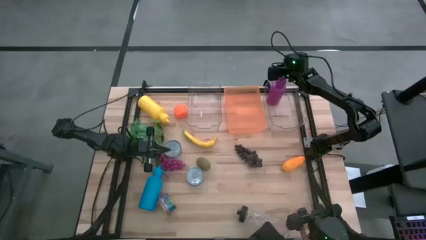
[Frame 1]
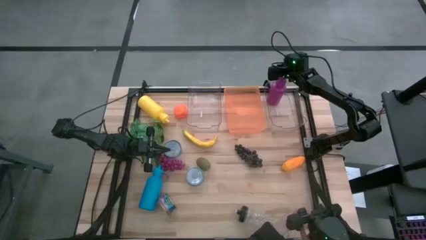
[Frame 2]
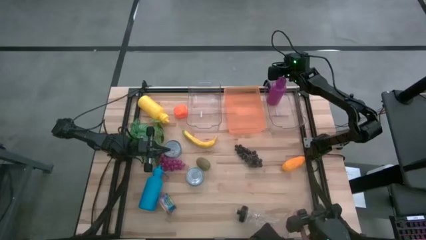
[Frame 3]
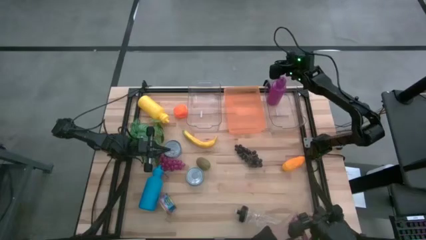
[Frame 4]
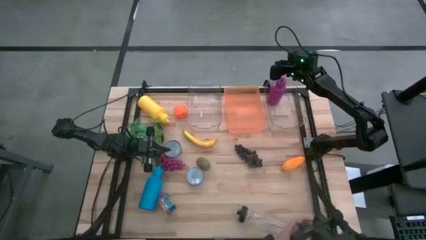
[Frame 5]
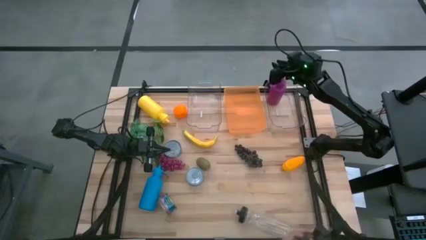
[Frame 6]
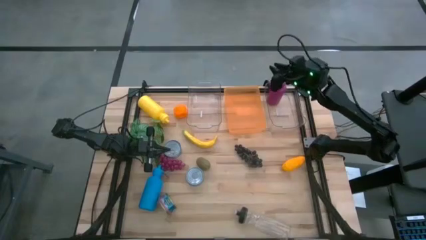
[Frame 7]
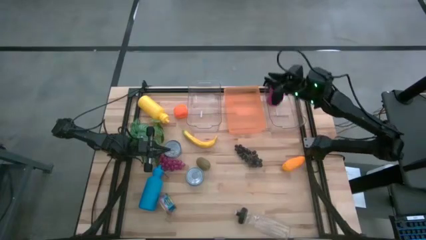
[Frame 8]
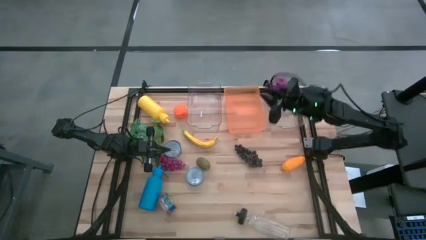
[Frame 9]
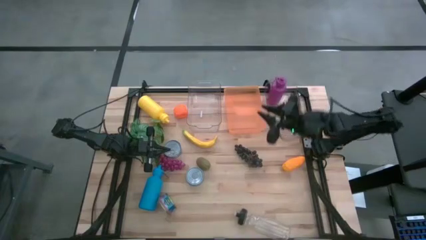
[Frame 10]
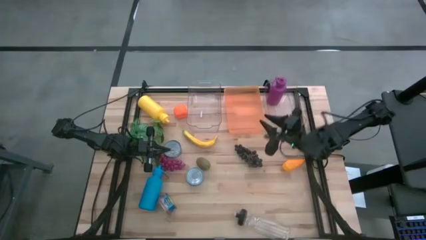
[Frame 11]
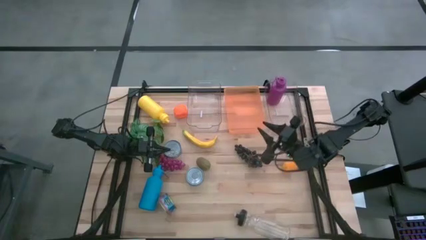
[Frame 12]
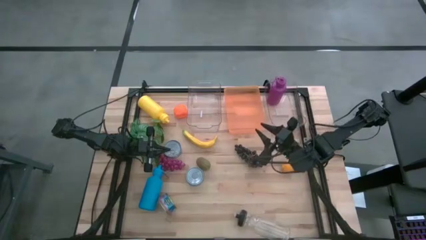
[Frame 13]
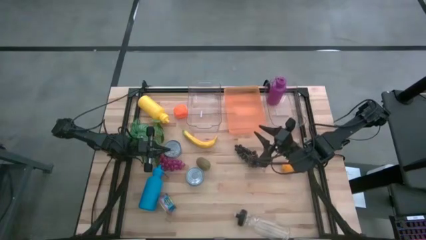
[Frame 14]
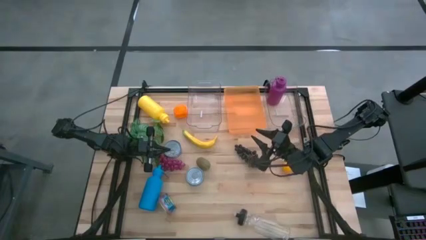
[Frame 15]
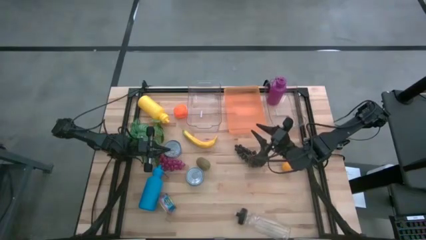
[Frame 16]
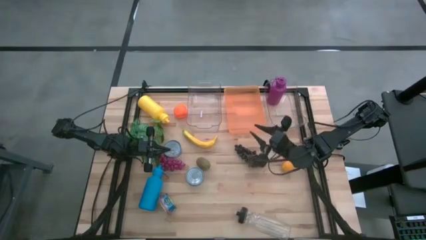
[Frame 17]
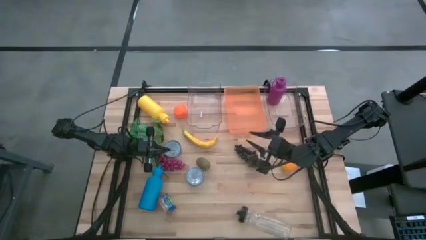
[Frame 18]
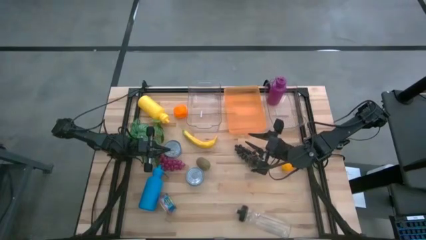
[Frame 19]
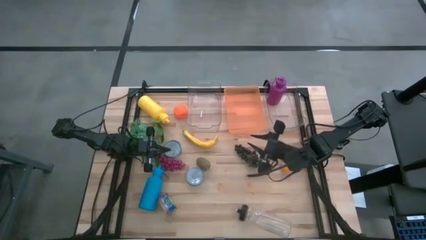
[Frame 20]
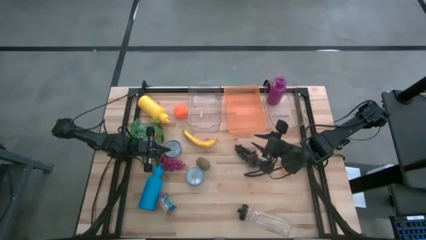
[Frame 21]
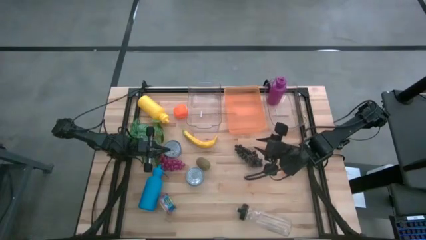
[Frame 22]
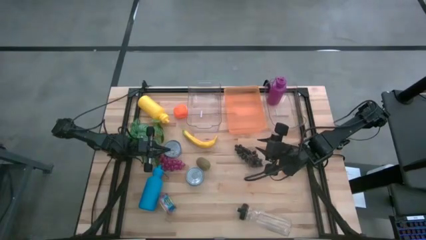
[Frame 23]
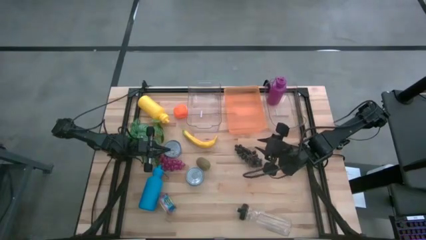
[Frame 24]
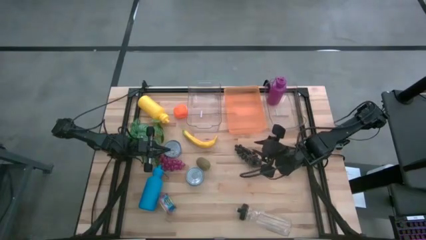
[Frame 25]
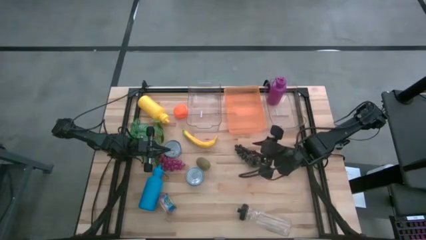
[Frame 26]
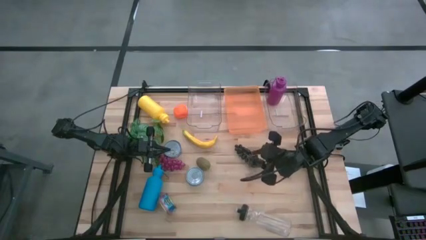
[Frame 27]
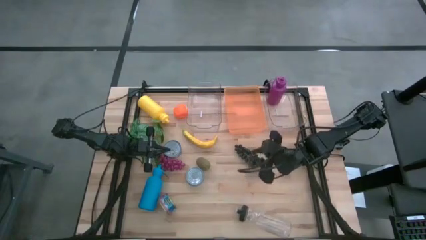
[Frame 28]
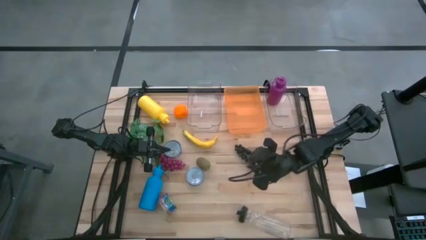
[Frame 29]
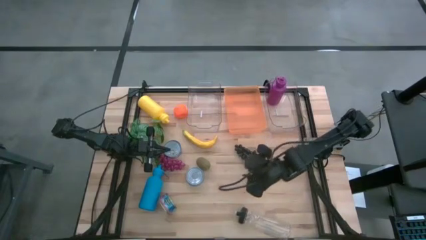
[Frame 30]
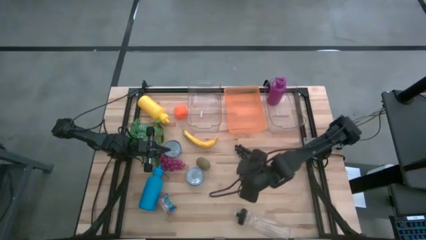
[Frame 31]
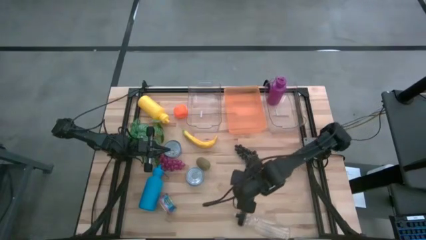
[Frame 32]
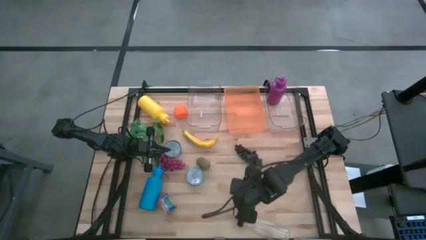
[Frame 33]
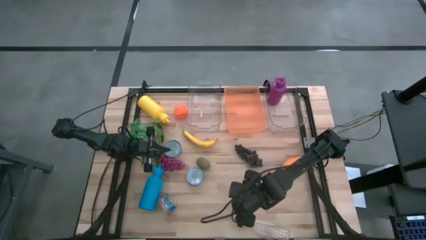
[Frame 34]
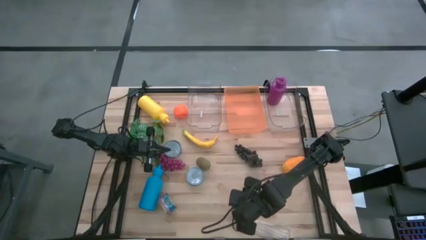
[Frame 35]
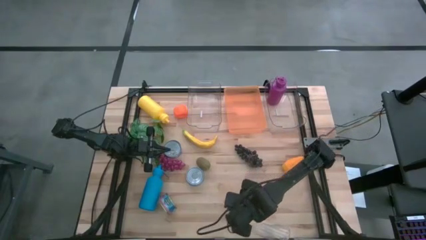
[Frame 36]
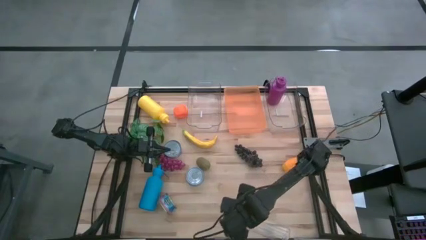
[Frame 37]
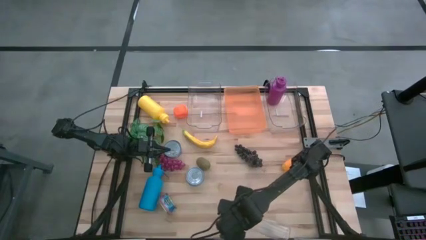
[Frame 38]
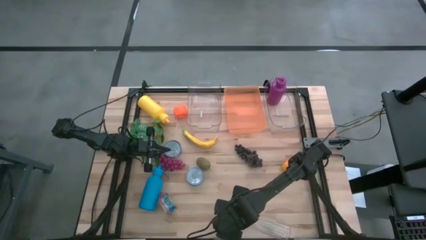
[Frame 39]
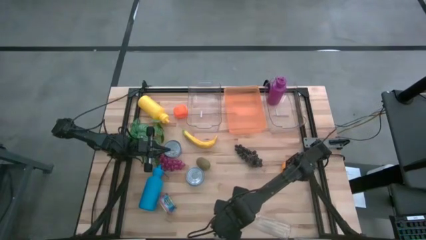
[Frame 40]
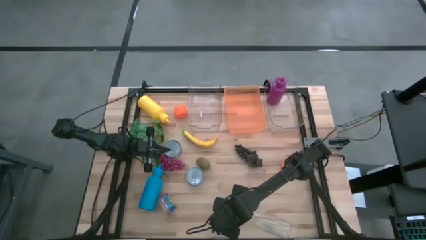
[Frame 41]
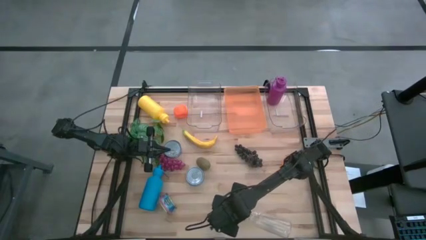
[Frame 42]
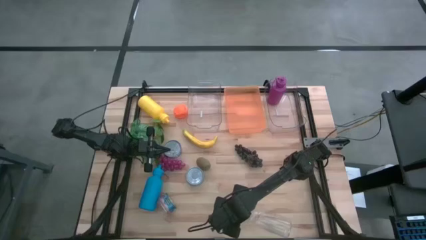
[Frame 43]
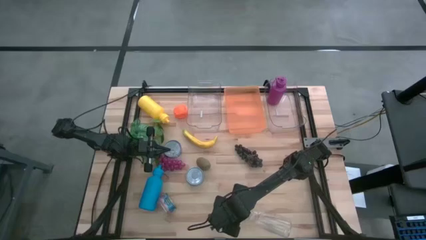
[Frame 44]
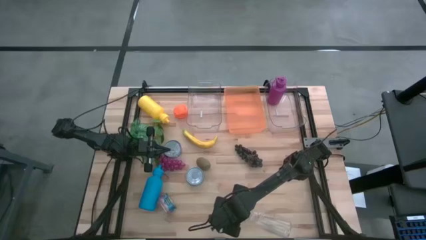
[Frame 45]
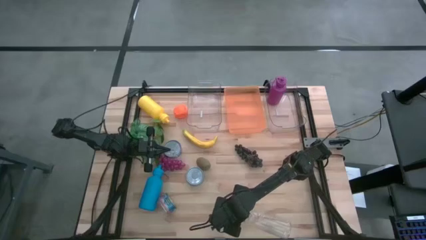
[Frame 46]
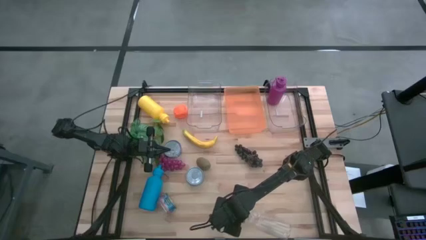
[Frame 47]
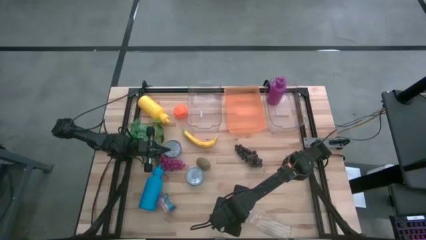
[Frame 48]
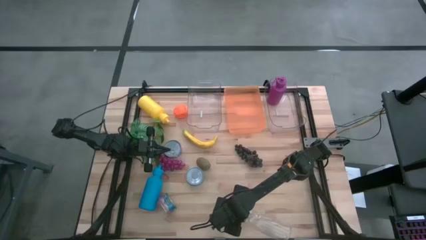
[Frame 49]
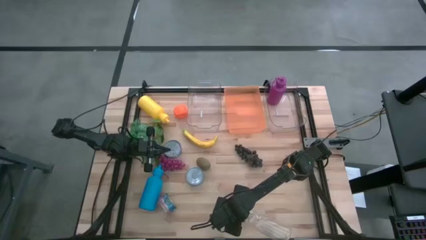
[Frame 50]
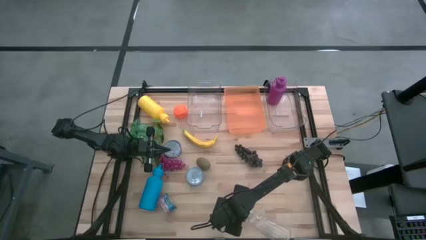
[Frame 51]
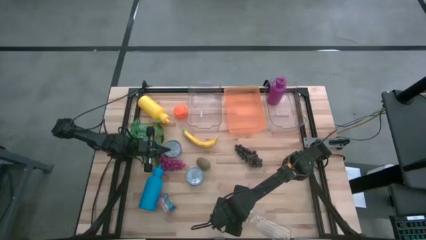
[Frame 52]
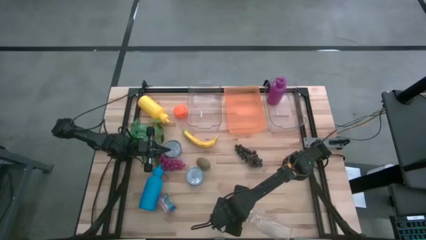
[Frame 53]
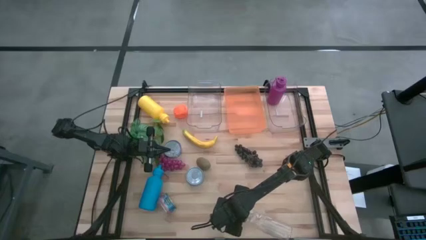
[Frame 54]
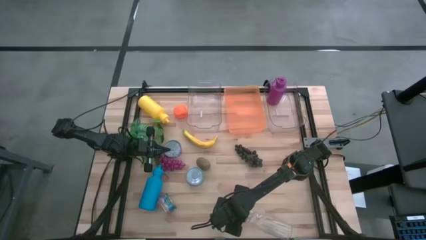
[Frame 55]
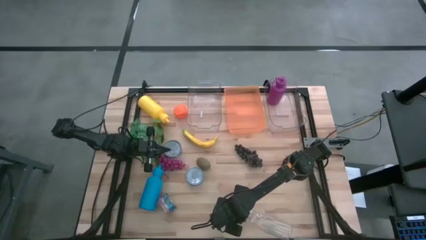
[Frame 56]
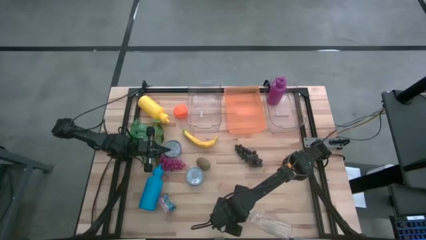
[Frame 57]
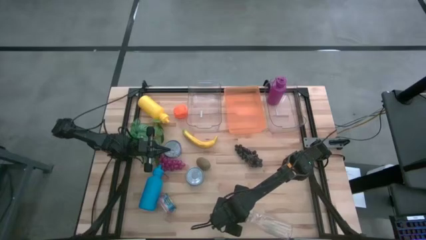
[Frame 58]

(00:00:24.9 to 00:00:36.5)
Task: Pick & Place Food Item
Put the transparent water bottle into the right transparent bin
